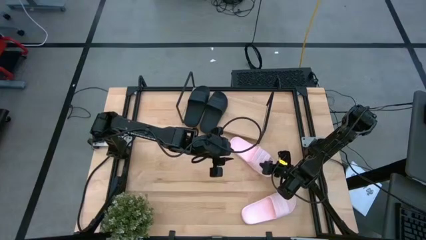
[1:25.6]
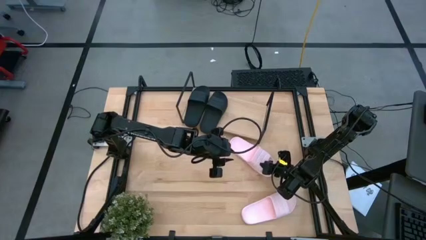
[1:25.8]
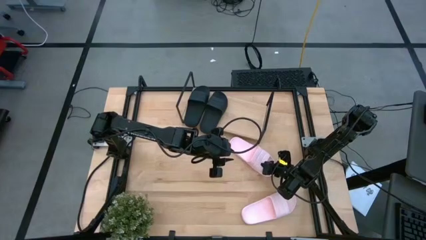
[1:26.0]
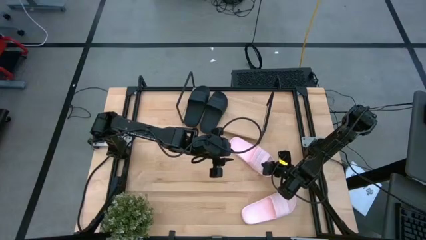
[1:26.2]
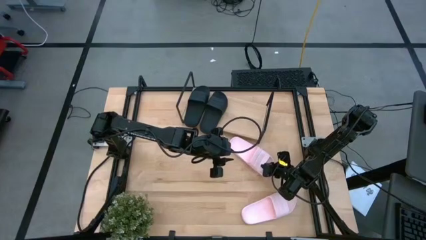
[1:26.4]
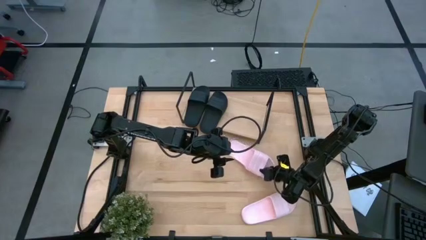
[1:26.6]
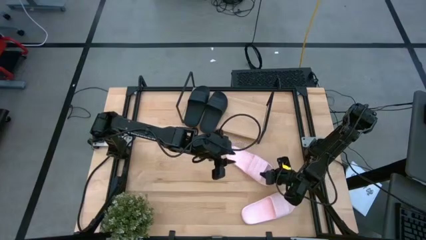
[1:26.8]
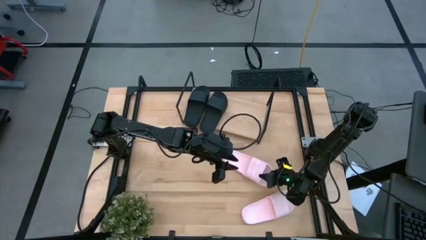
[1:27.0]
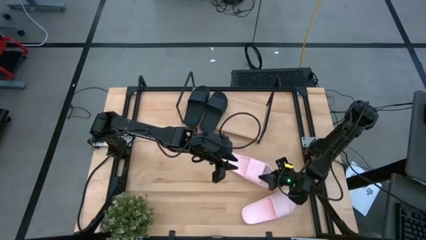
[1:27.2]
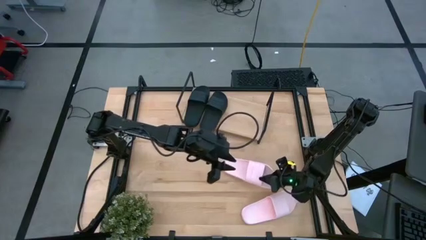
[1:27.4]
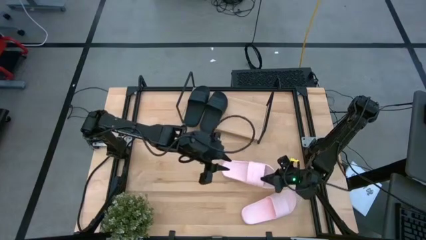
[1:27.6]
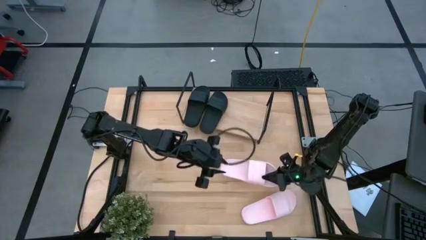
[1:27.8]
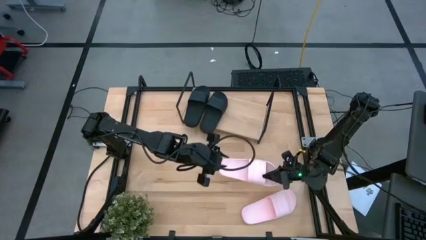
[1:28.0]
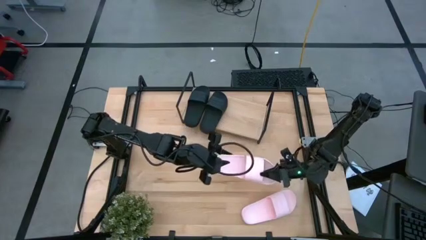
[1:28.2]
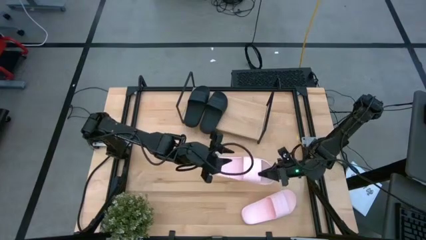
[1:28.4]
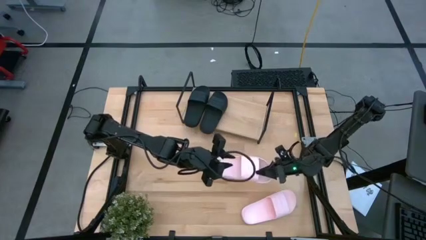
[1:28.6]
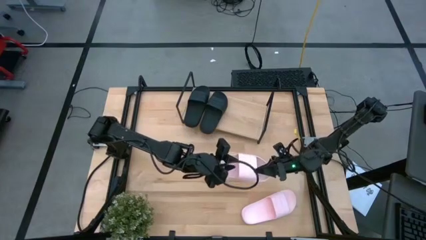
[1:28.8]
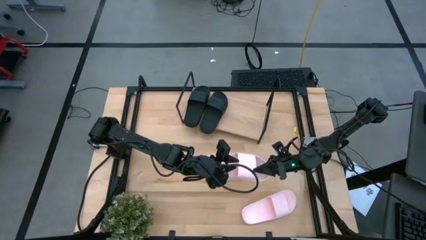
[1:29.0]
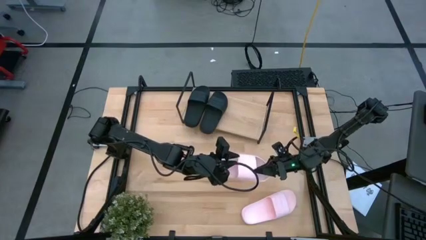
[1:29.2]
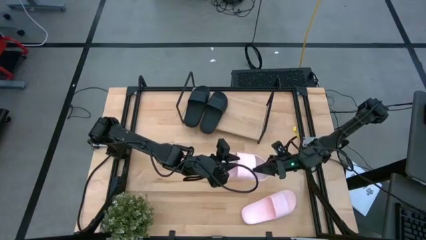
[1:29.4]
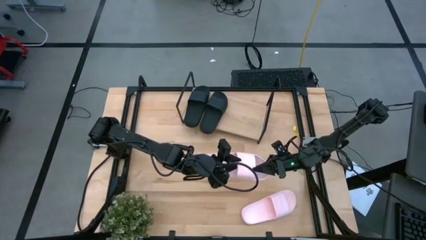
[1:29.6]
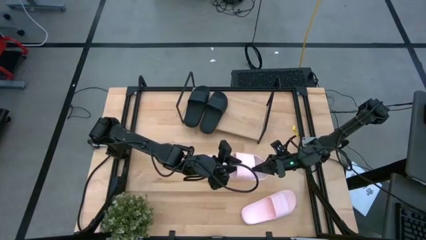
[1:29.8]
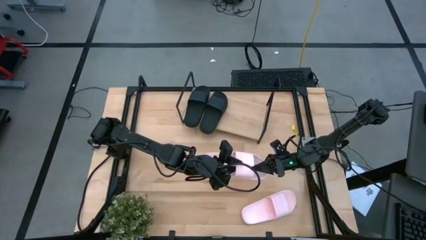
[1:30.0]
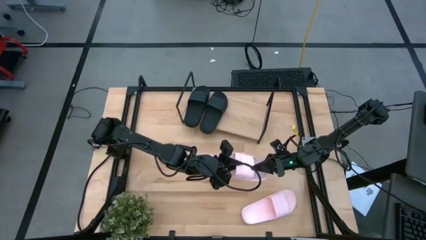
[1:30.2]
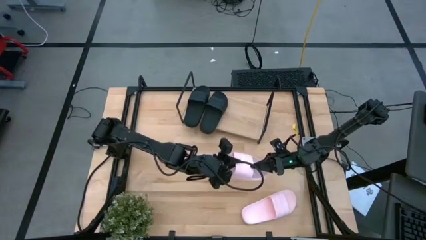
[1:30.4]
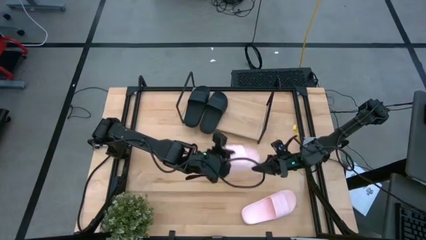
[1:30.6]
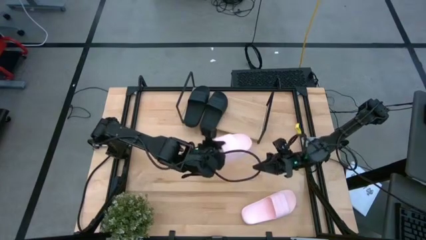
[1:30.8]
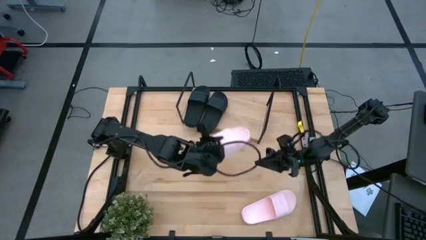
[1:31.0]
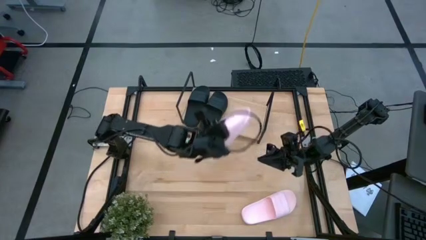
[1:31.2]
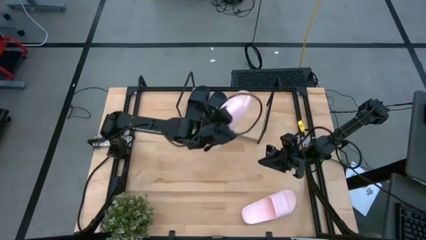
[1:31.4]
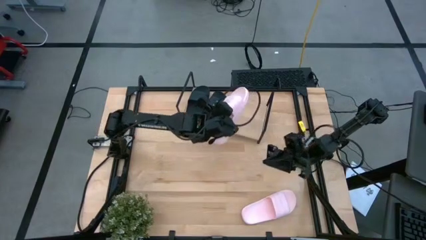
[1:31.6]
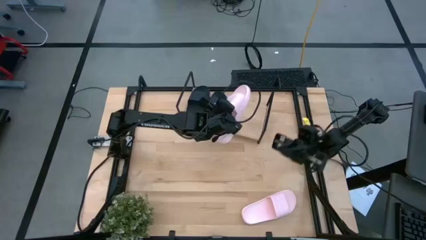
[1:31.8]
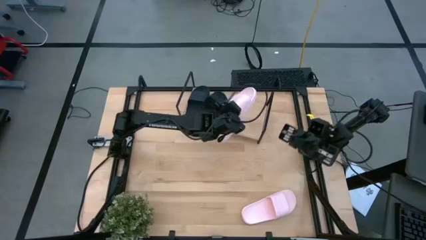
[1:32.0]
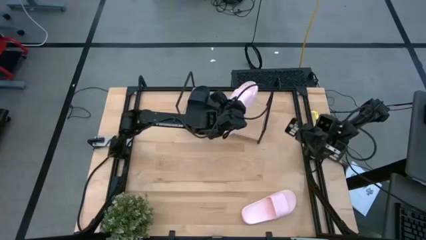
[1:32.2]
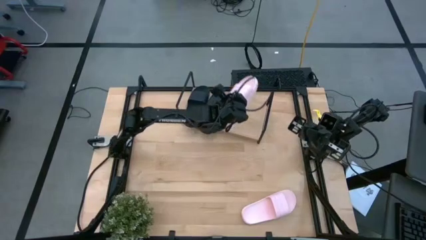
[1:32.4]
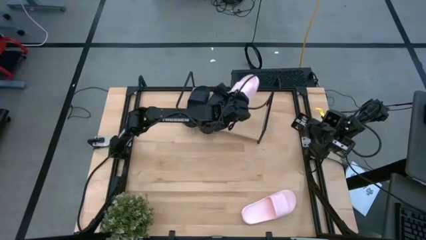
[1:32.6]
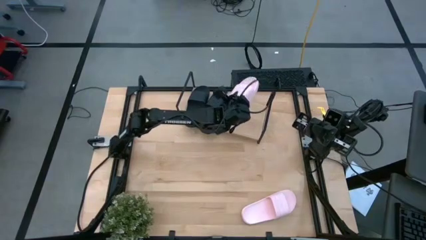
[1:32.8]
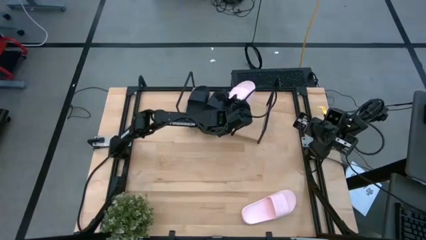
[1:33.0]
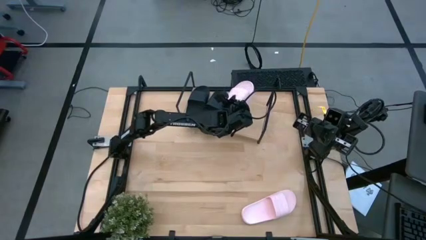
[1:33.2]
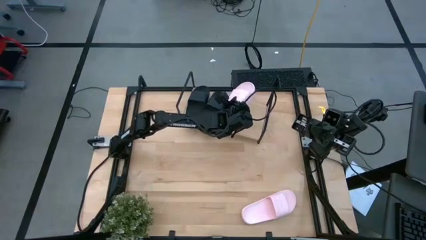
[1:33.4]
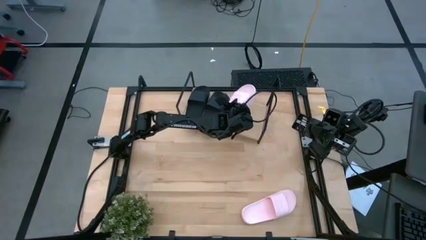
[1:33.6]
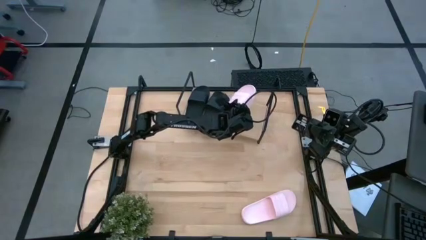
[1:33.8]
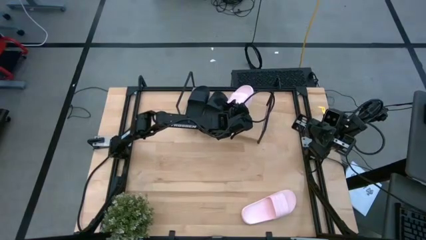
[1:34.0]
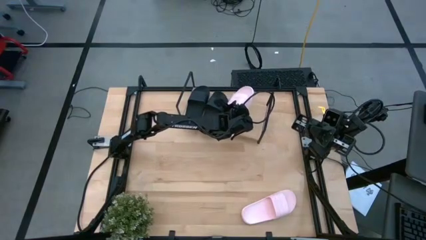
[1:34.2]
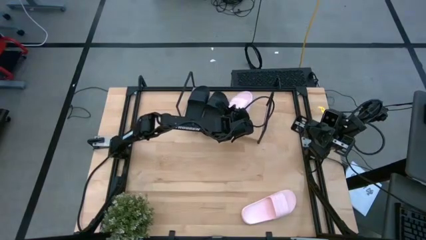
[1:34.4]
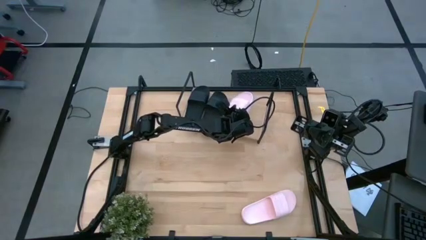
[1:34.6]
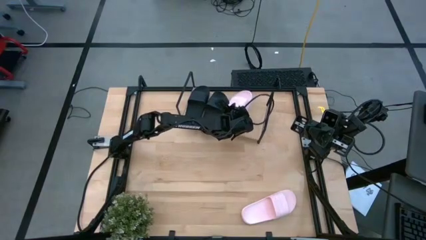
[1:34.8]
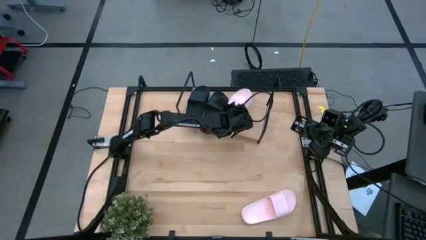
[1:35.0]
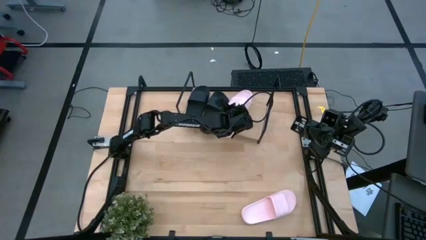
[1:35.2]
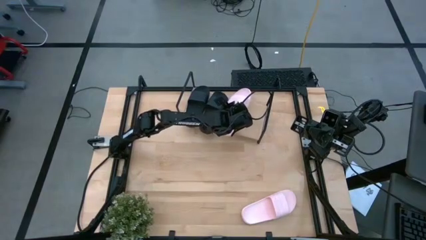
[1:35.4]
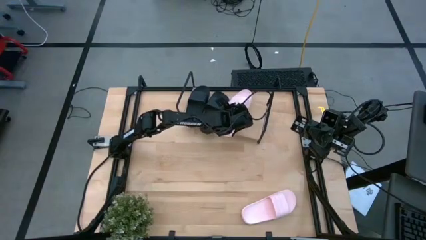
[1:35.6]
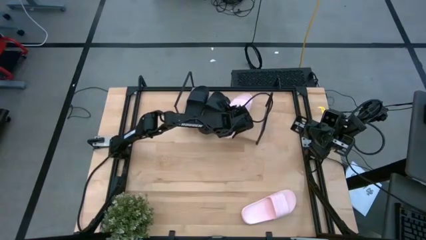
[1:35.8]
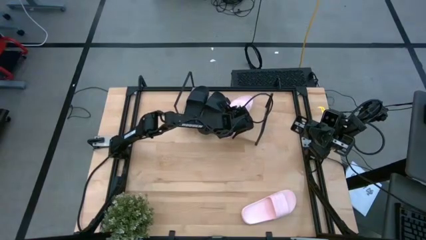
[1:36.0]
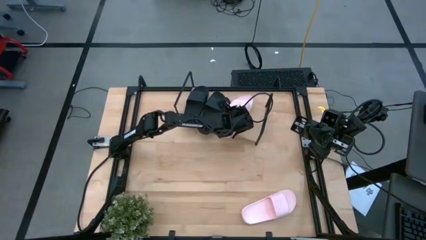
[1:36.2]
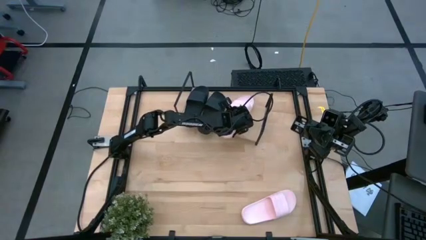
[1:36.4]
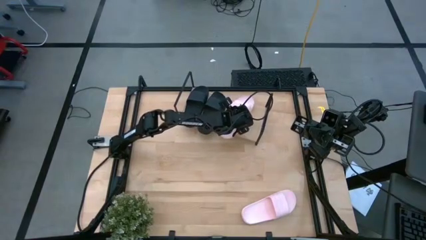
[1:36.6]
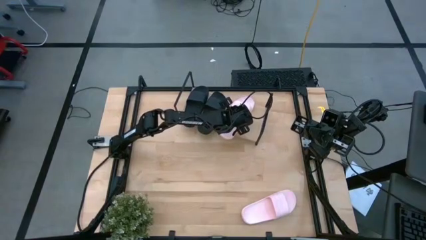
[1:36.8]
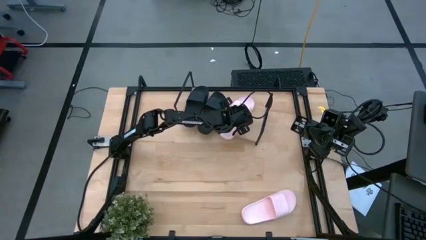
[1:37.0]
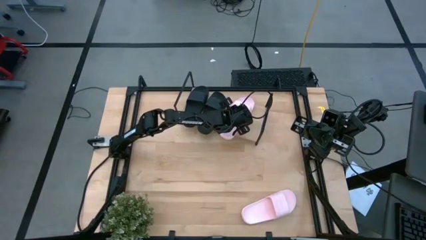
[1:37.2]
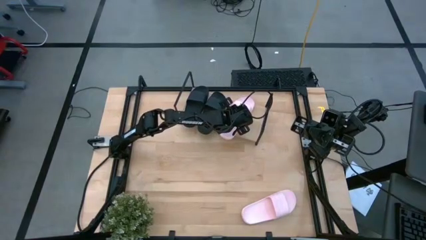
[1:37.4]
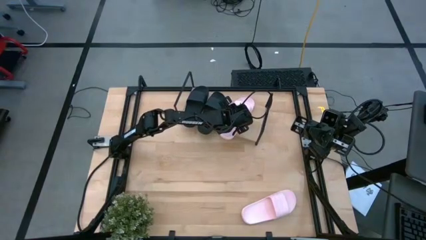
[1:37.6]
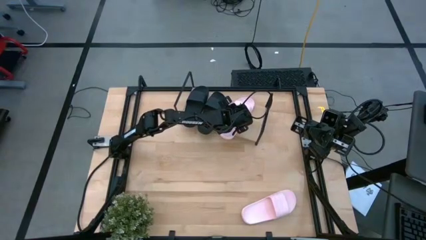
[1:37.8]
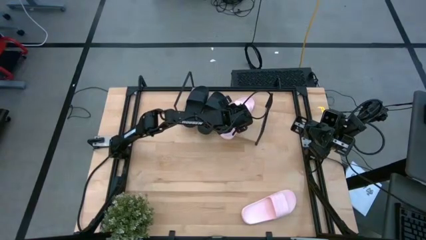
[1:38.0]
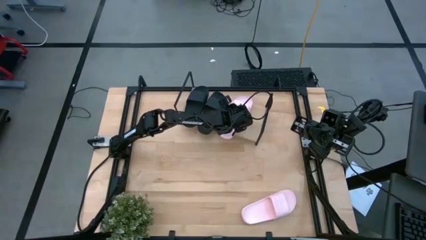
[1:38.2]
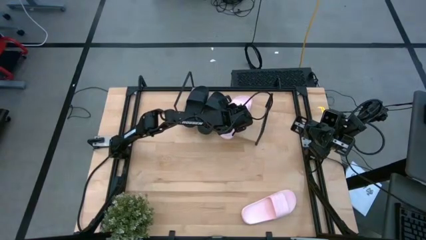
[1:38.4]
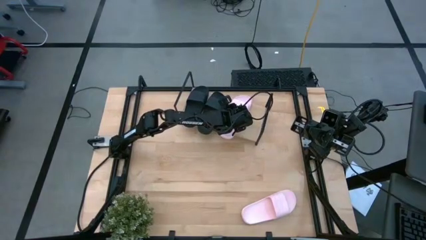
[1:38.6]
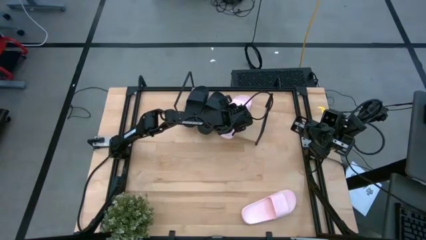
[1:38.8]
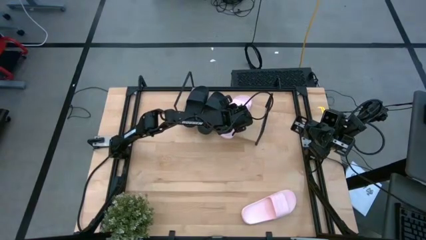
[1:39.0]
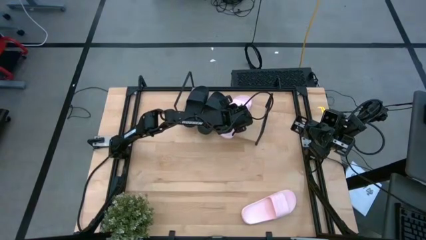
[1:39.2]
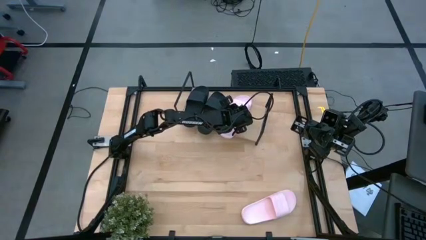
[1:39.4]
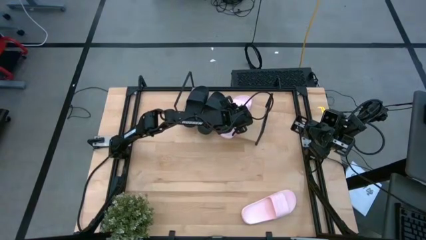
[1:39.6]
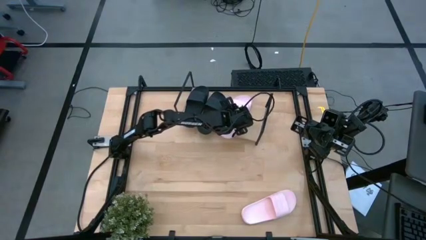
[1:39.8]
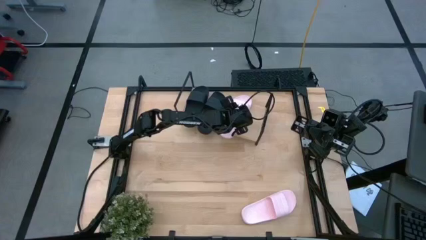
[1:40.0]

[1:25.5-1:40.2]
Task: Pick and place slides into the shelf
Put the top pink slipper on the shelf

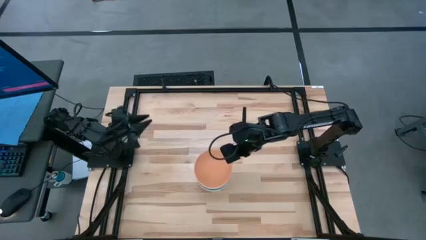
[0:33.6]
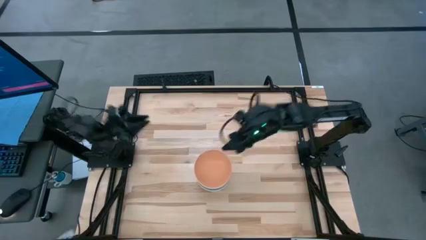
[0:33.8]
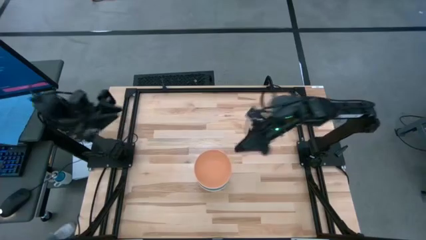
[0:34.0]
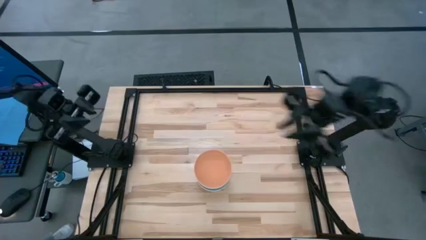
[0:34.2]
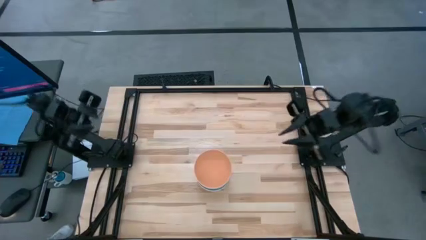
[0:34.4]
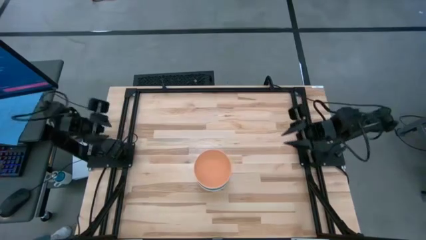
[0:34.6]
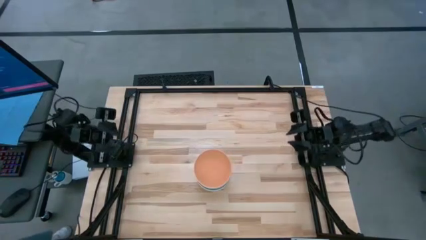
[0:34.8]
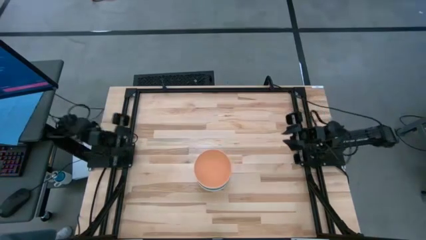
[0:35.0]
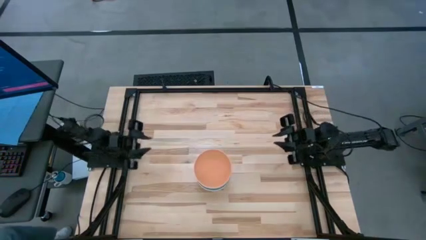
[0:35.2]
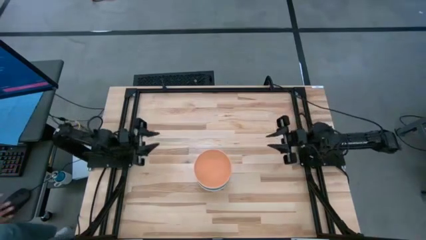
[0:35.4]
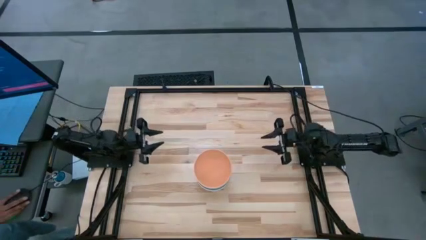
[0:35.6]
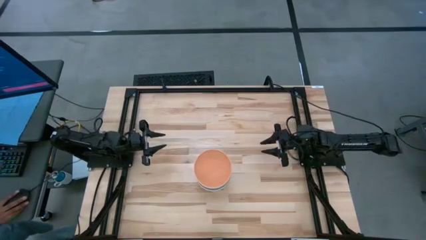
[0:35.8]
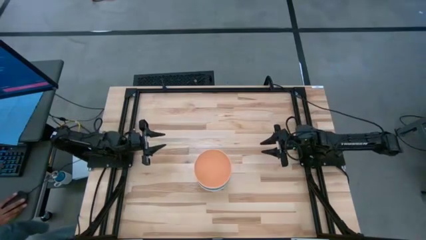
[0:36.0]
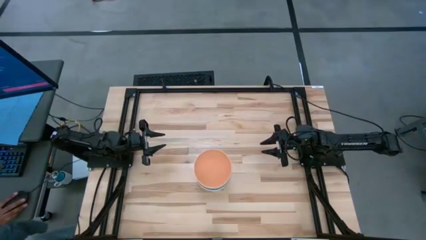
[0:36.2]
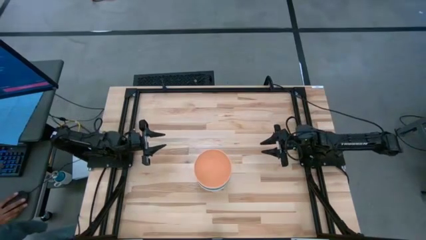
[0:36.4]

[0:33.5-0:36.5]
Task: Nest bowls inside each other
Return to Home Position
